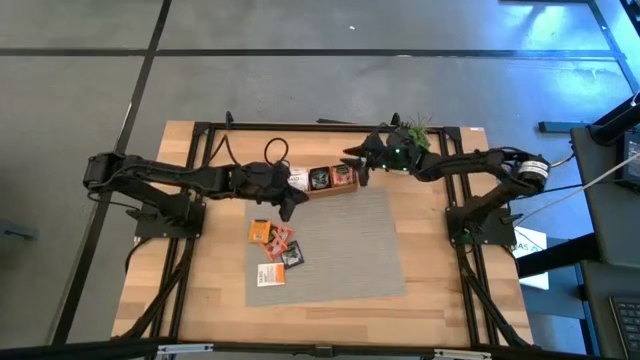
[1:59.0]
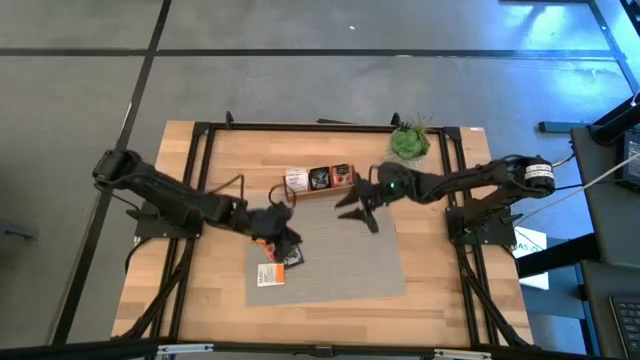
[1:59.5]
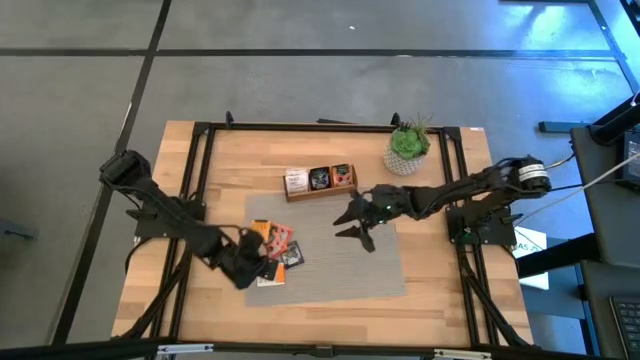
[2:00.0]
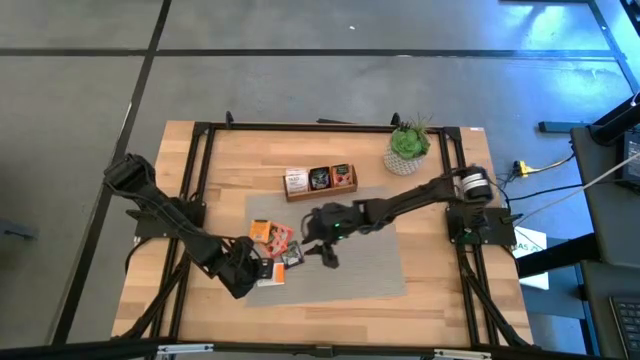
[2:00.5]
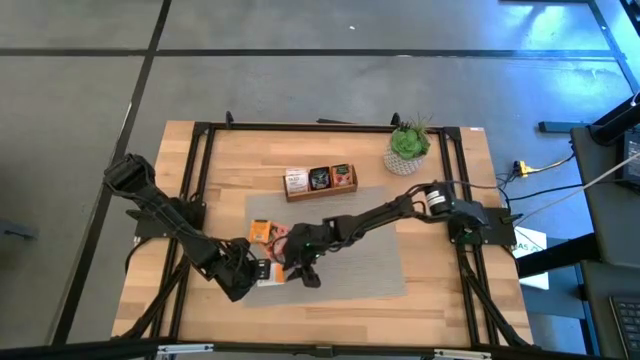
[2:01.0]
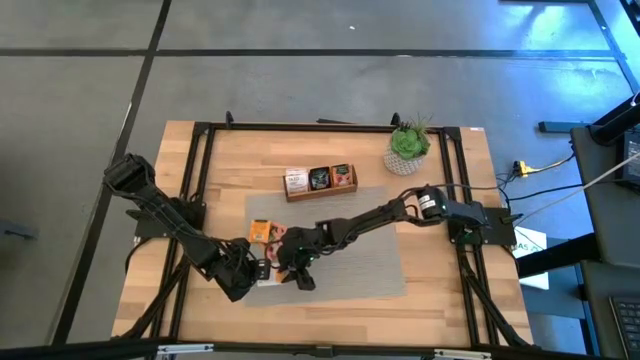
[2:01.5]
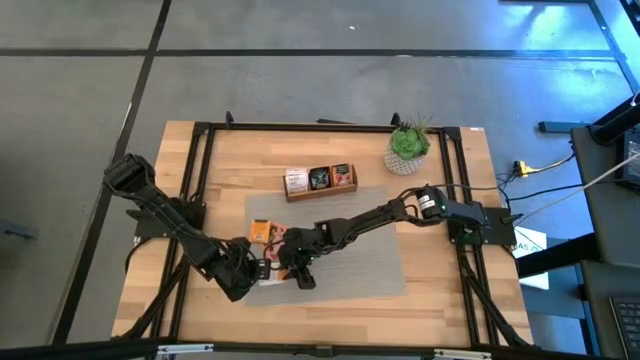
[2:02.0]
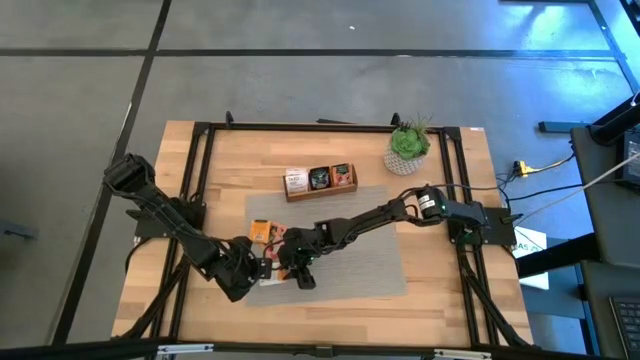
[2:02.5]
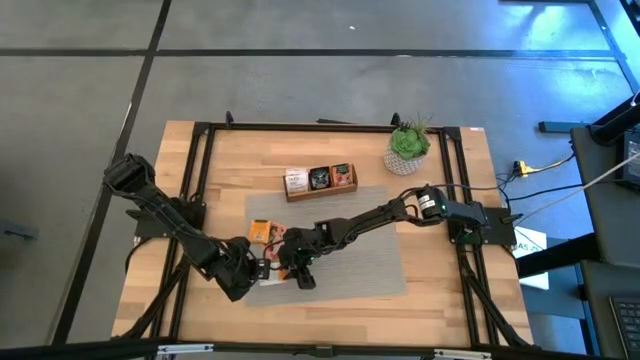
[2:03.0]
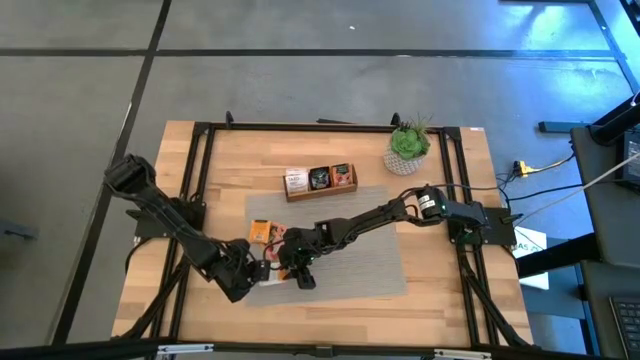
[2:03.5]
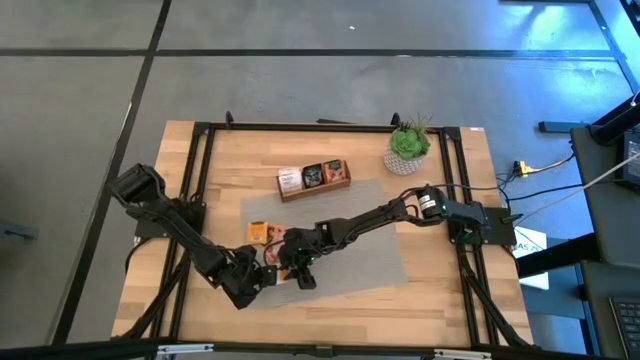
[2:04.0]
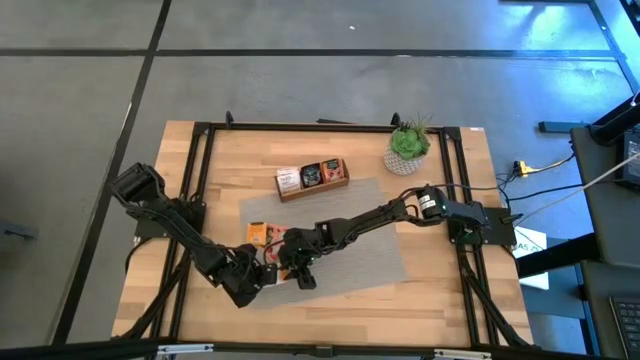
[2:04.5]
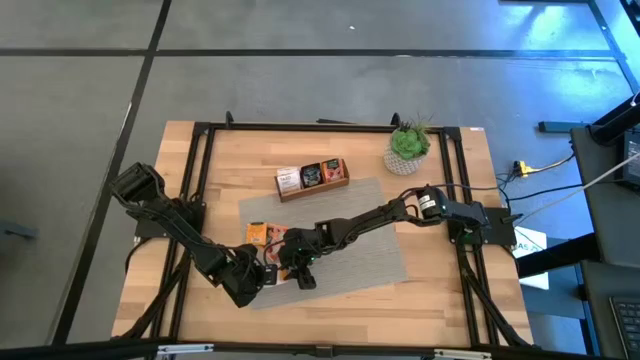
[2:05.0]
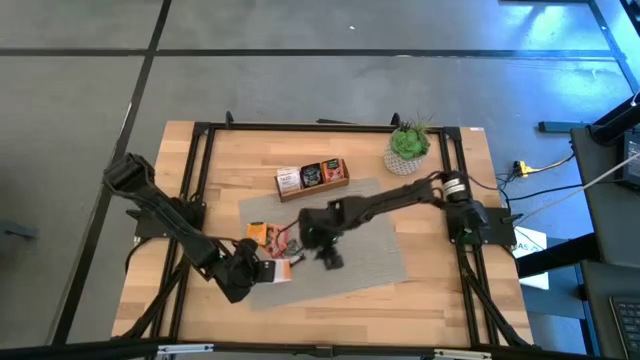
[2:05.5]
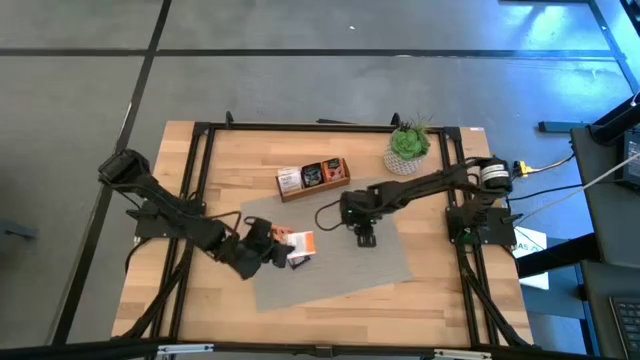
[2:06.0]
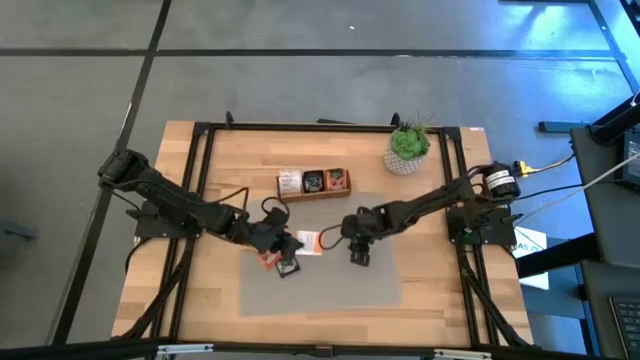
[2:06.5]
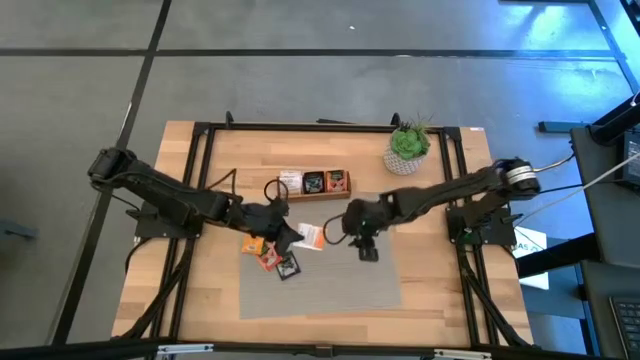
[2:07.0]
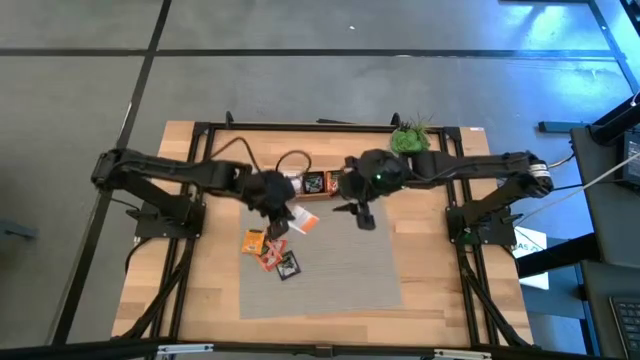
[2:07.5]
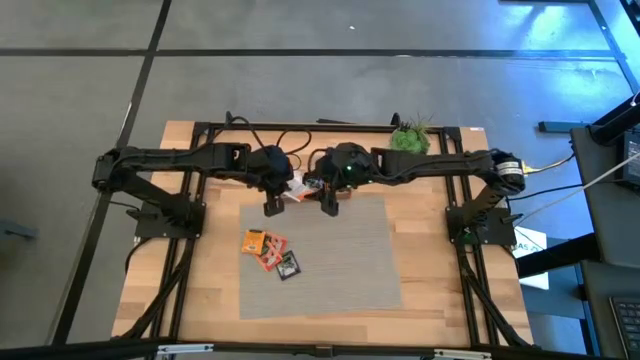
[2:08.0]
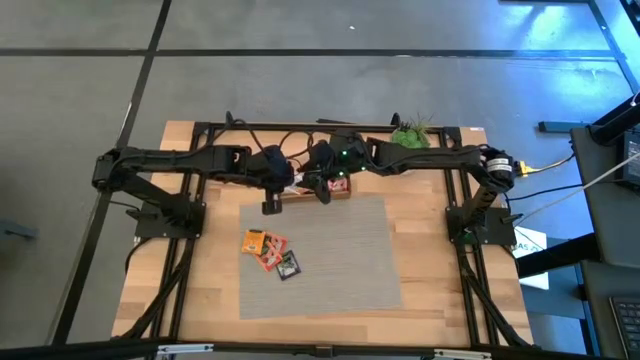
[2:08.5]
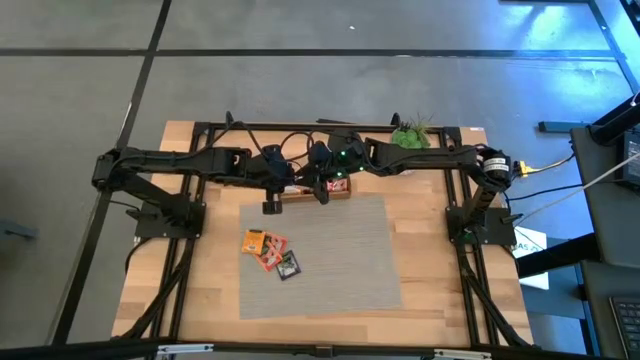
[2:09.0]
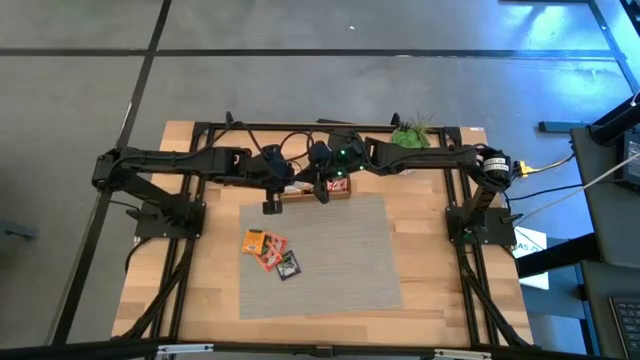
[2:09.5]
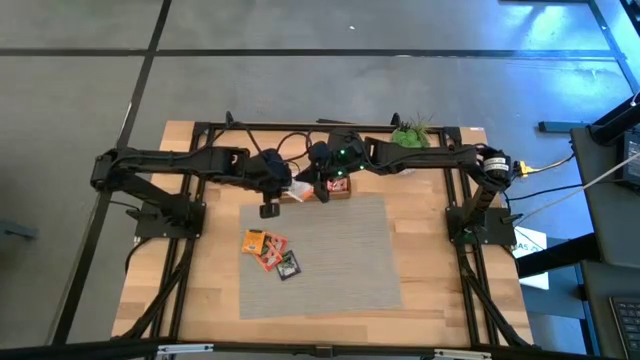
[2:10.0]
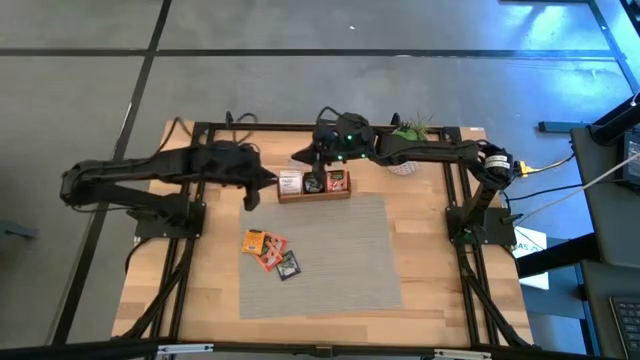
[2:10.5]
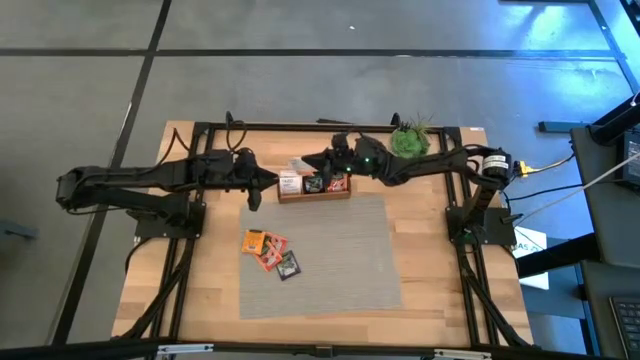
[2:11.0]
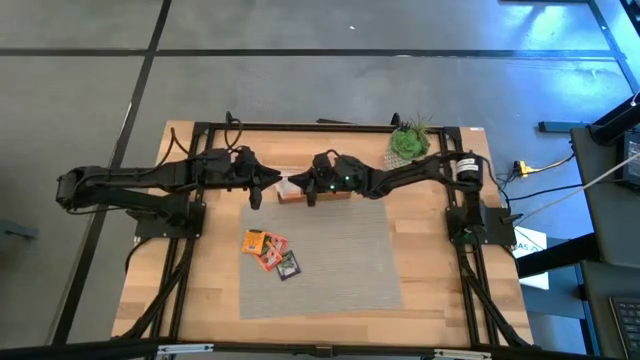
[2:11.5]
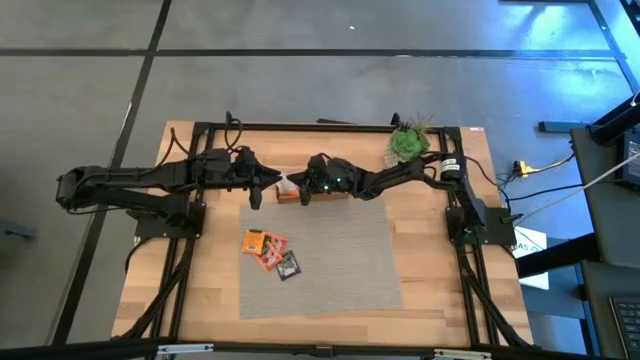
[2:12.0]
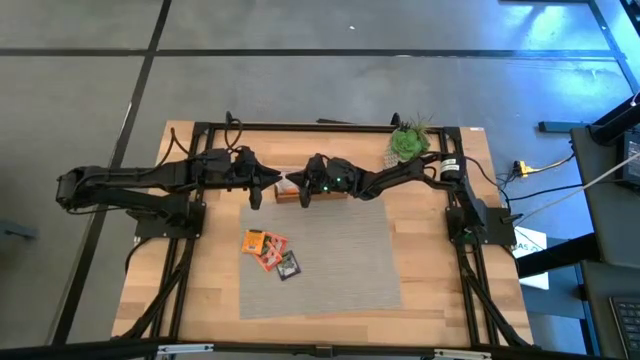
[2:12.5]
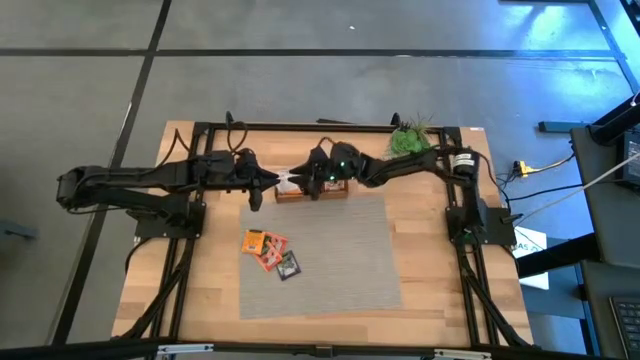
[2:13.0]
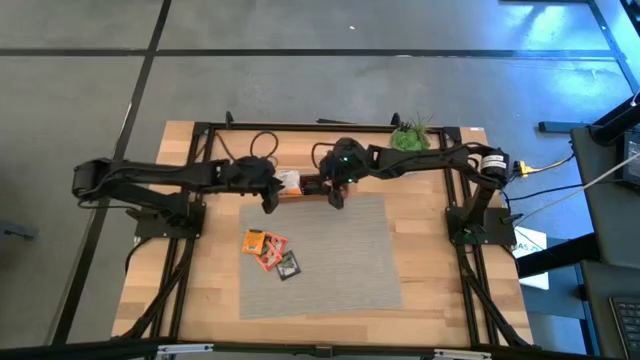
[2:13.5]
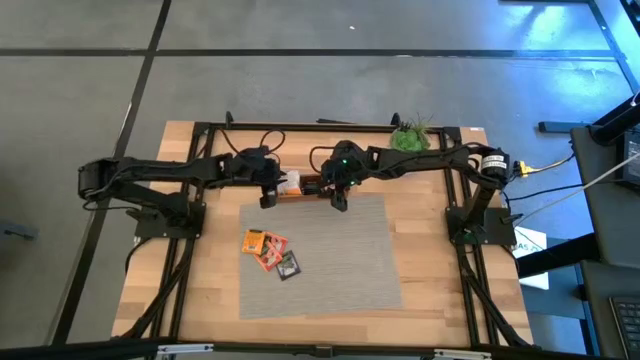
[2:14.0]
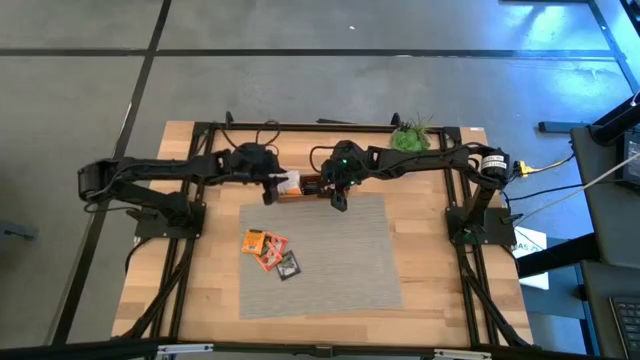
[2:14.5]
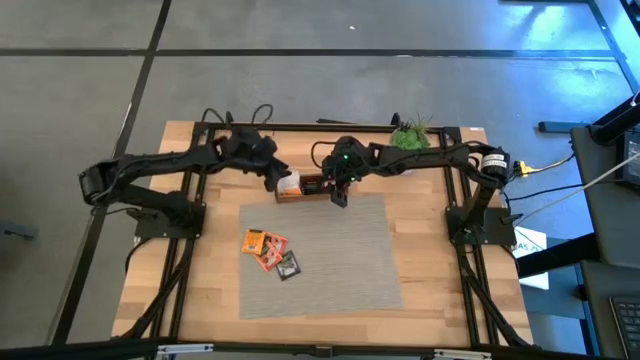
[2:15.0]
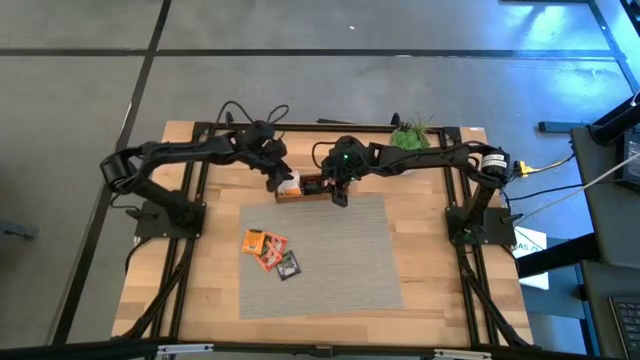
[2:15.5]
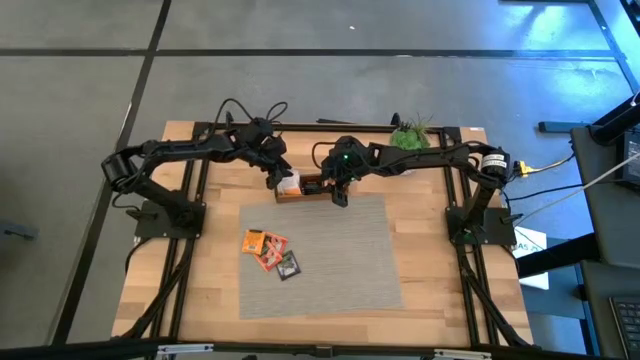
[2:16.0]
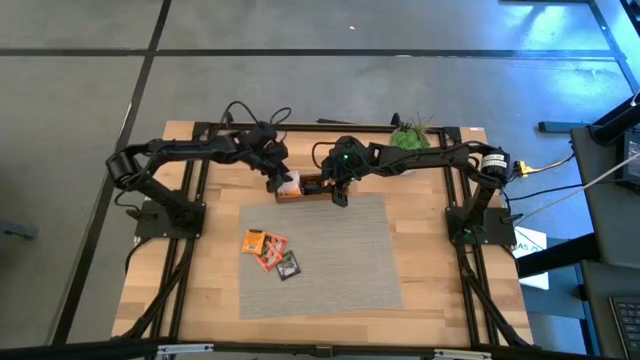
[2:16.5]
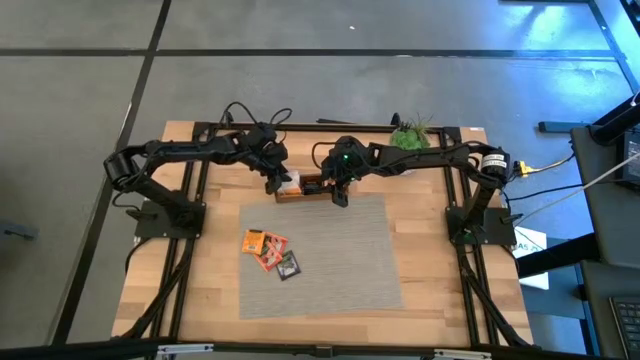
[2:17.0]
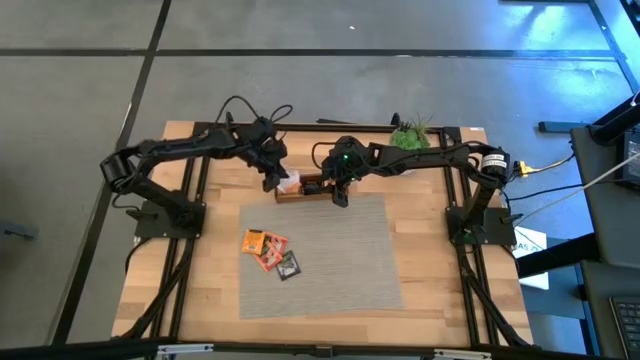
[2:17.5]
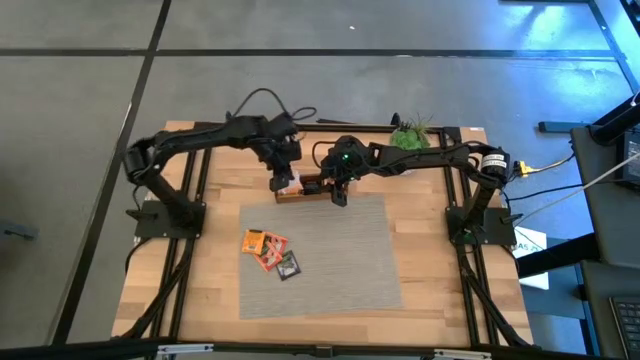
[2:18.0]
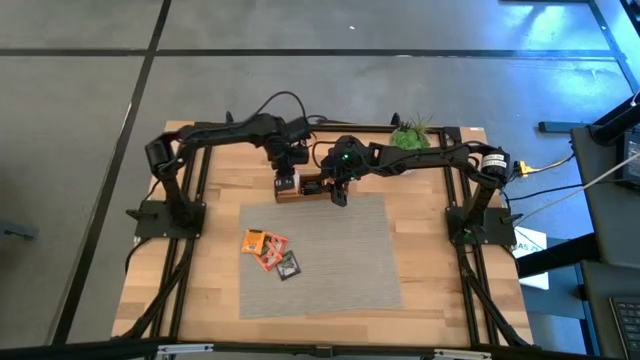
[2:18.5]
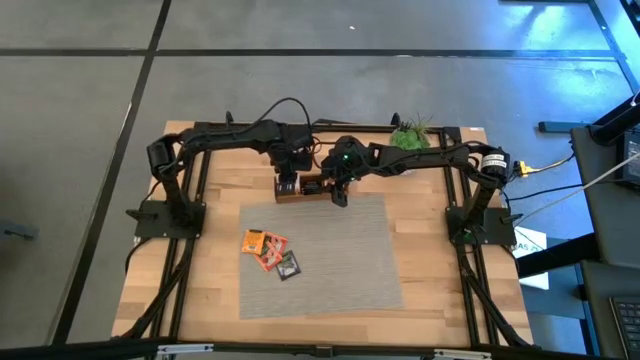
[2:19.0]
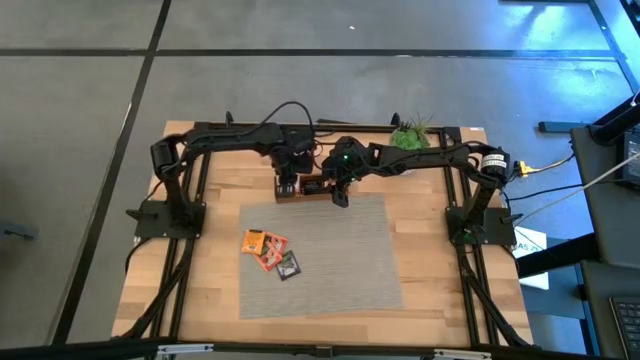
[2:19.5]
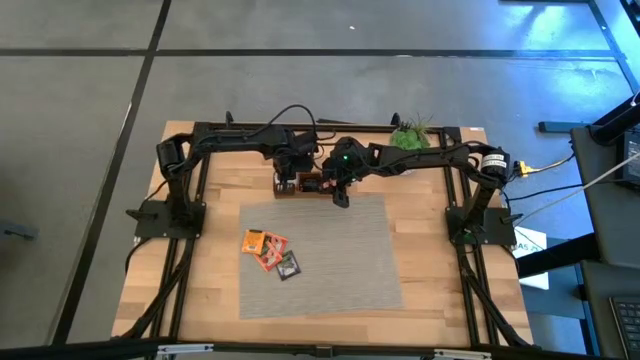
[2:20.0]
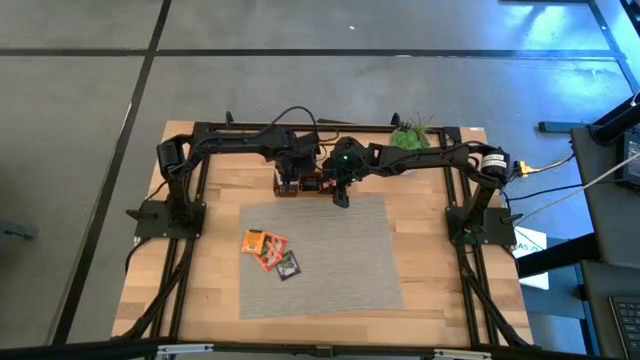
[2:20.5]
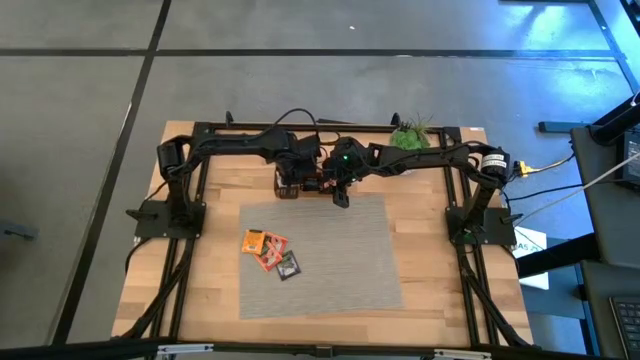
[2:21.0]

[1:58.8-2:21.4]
Task: Pick & Place Tea
Put the white tea bag into the left section of the wooden organizer
